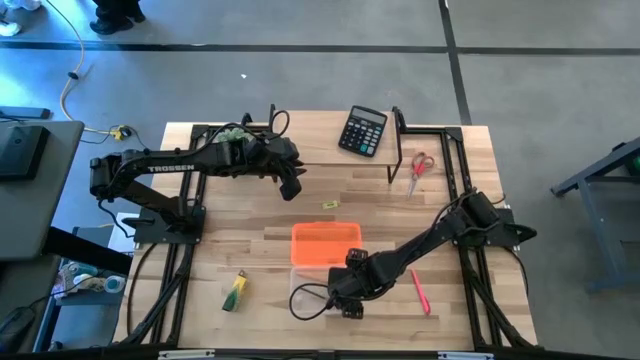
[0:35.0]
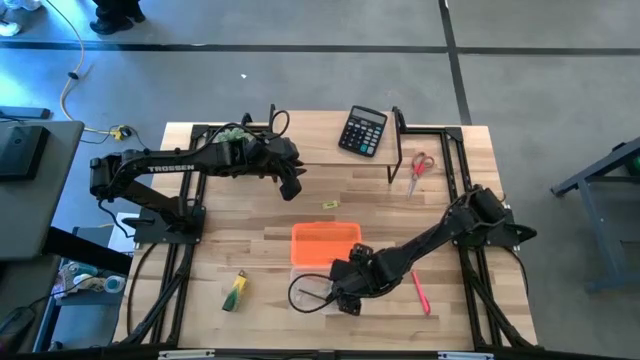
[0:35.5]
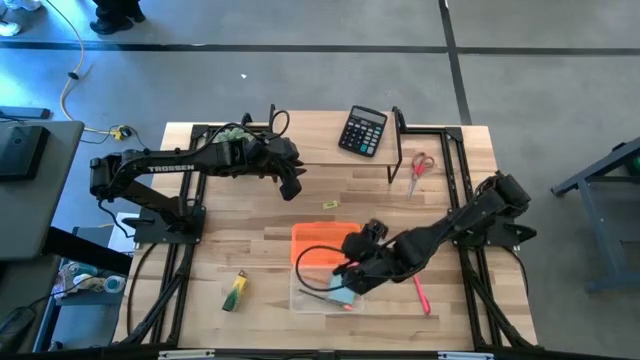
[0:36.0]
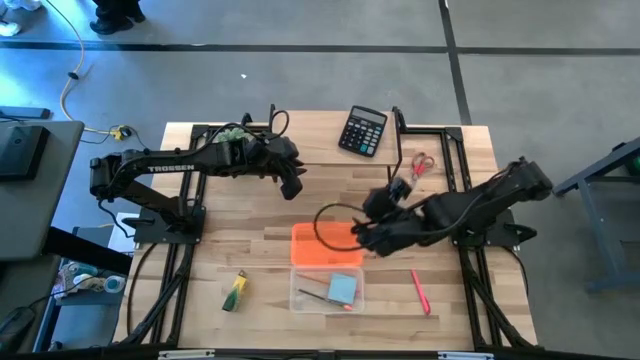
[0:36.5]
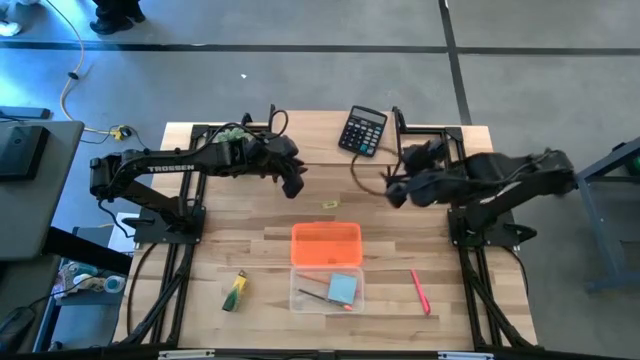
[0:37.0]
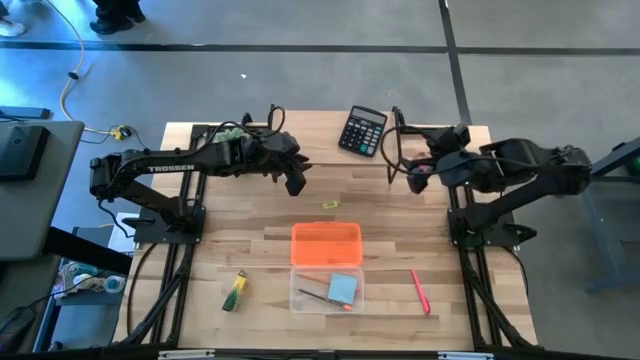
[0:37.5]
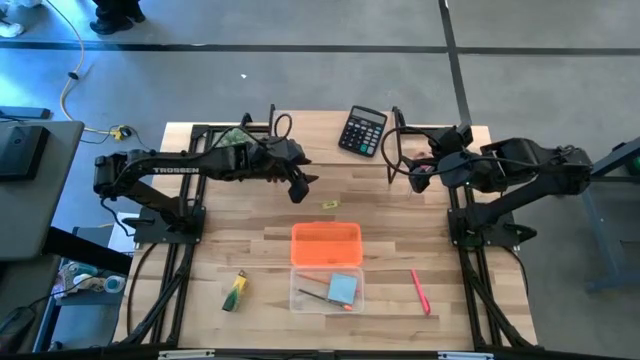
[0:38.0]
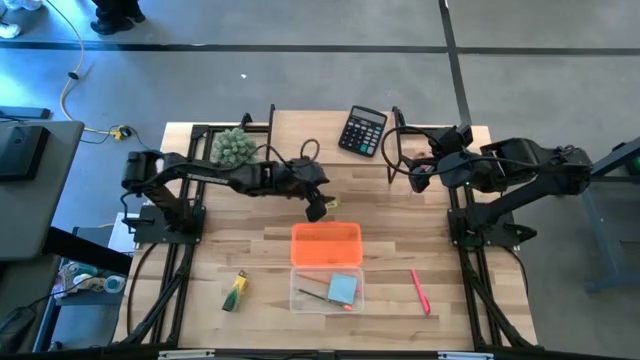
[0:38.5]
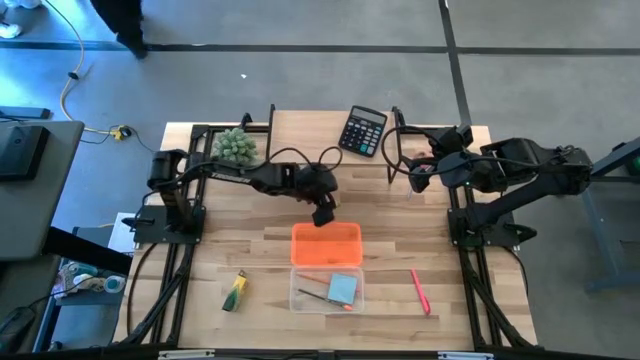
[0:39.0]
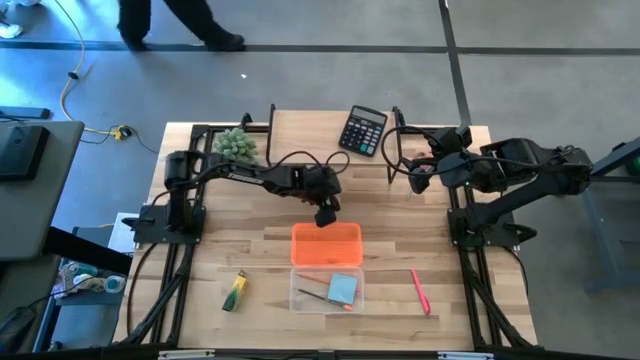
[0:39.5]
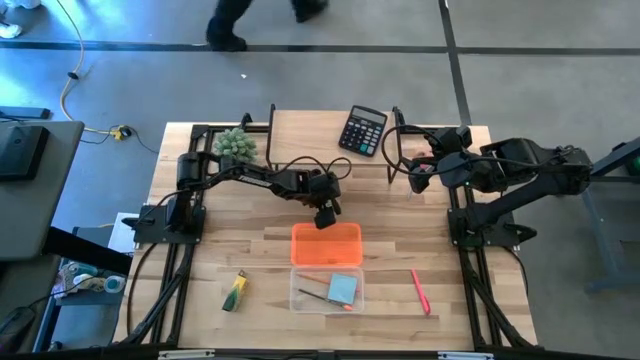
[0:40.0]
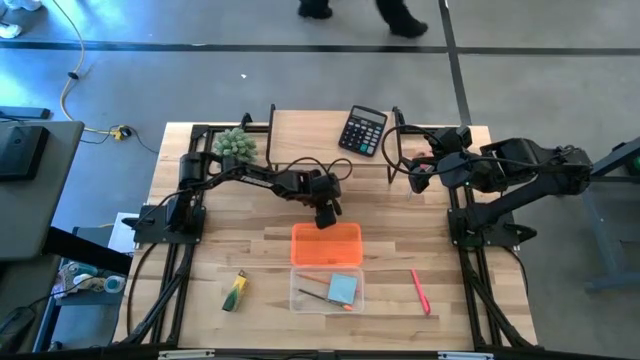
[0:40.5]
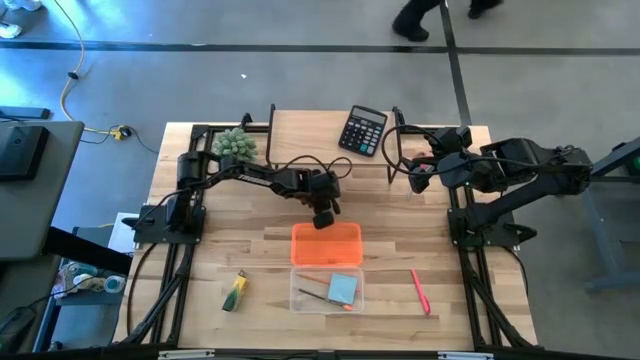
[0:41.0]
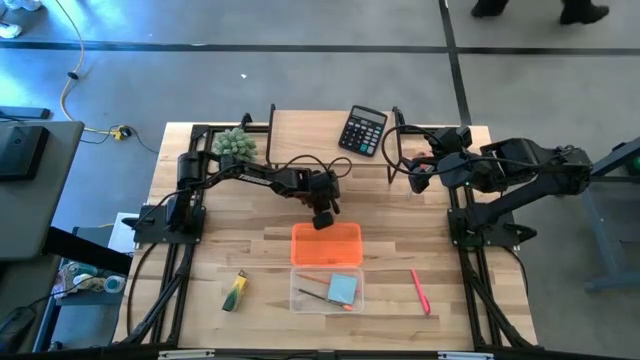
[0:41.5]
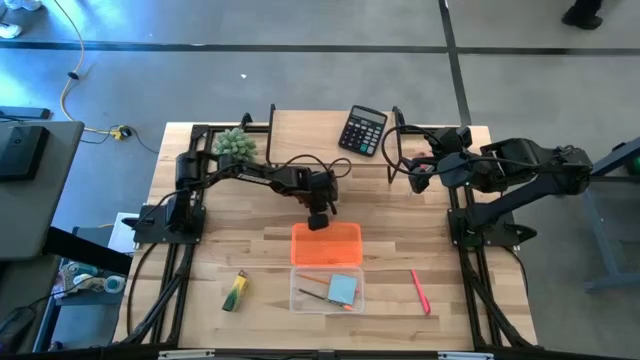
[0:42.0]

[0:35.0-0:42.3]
Task: Pack school essentials
Put the green eraser into the orange supply box

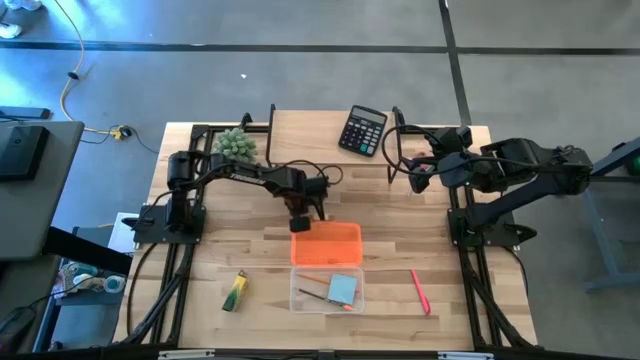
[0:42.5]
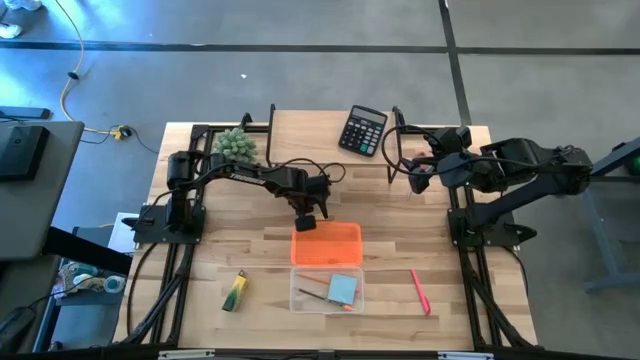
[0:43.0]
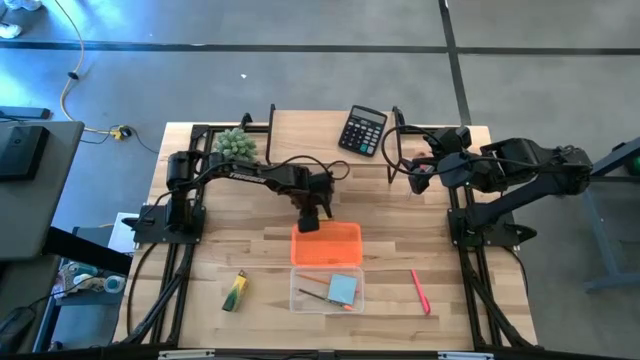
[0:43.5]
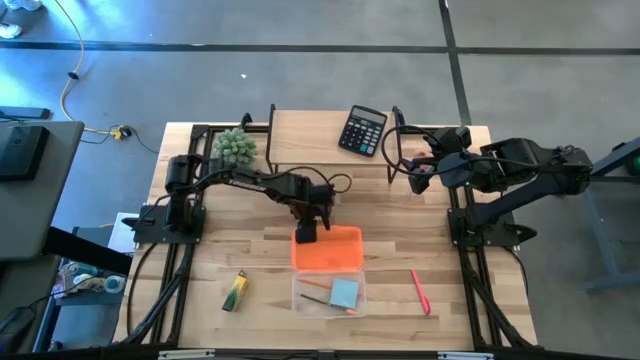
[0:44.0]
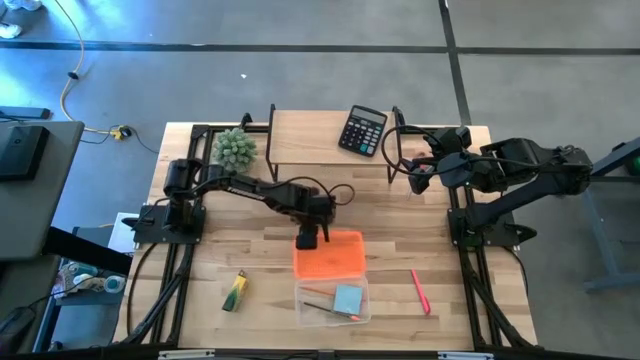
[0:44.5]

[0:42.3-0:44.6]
Adjust the orange supply box on the table

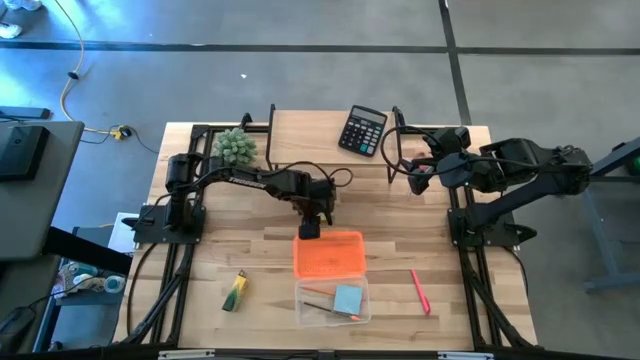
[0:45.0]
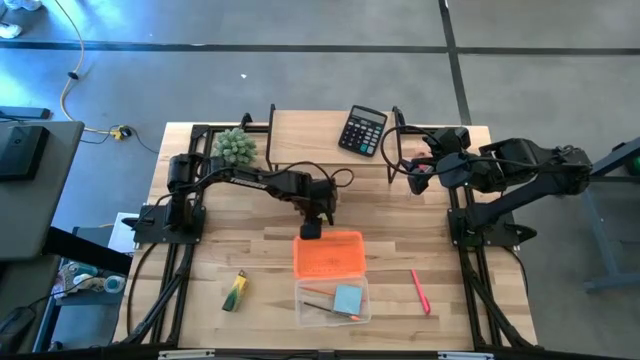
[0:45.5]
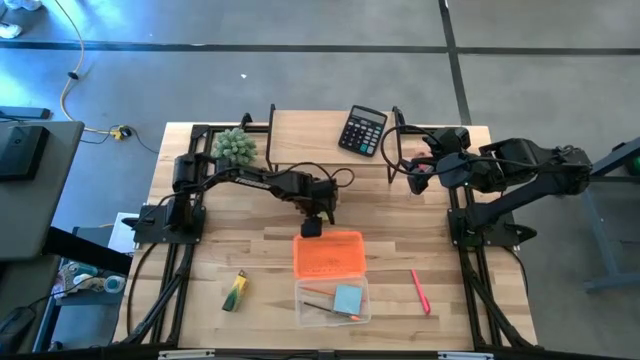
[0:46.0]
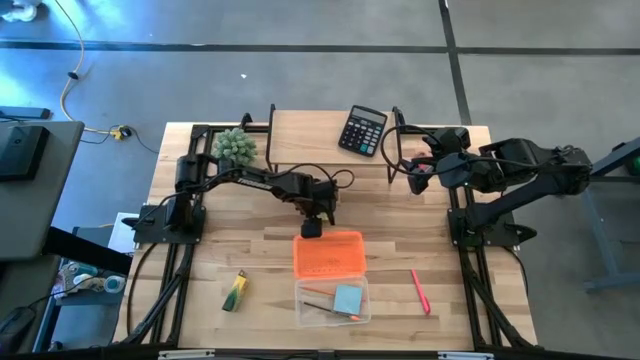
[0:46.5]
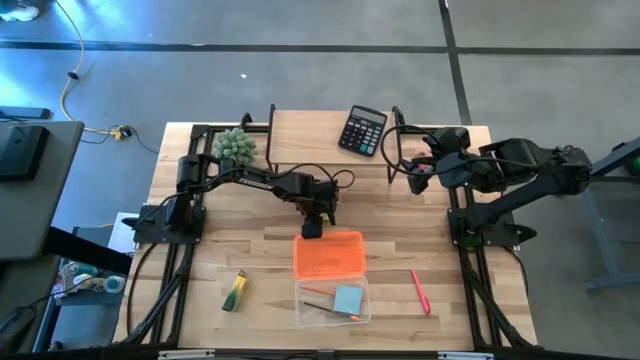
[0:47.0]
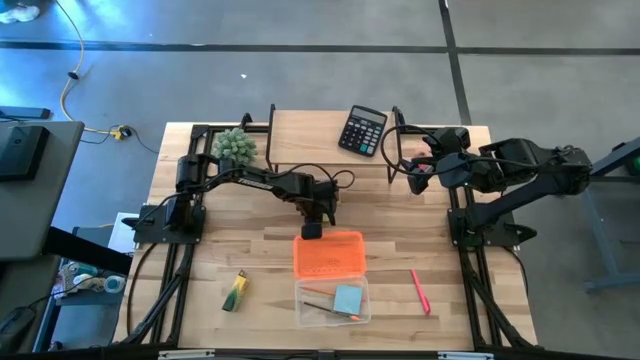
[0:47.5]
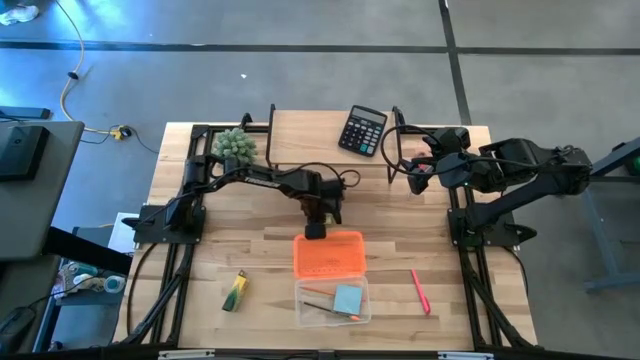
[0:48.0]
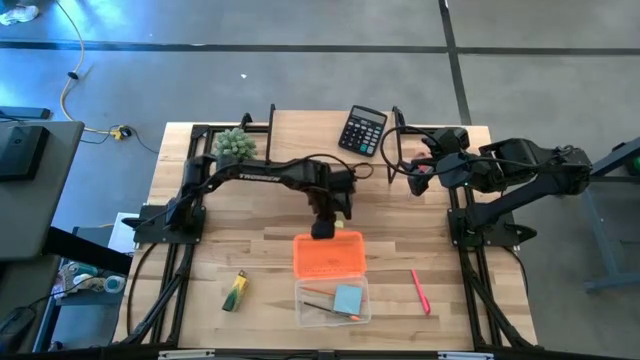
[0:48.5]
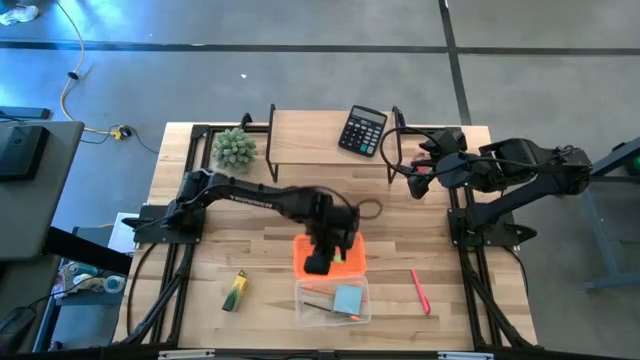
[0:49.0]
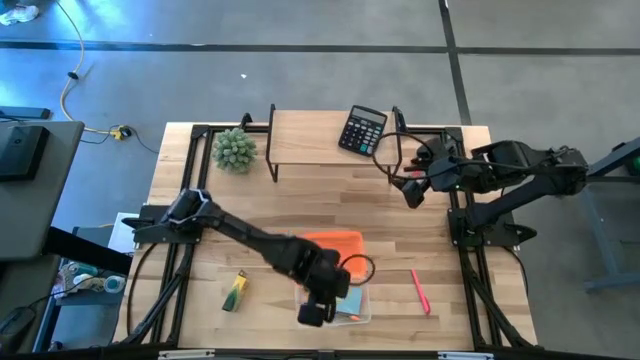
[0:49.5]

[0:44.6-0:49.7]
Put the green eraser into the orange supply box

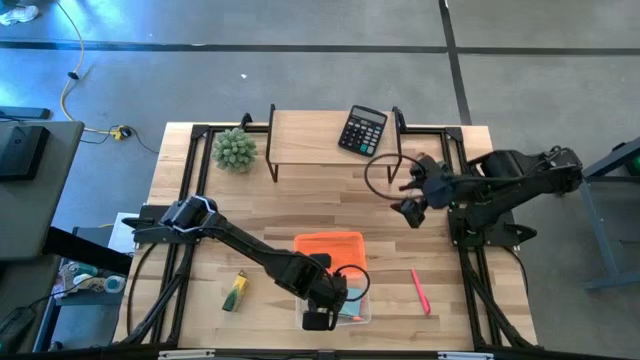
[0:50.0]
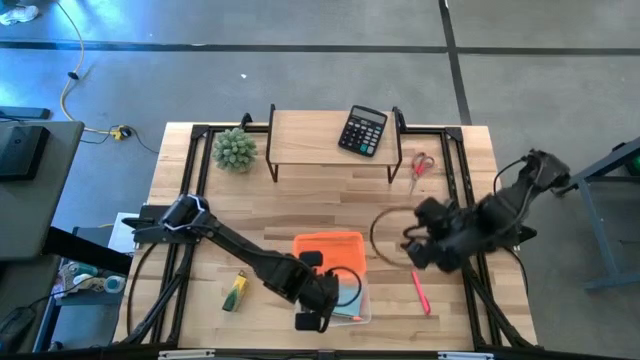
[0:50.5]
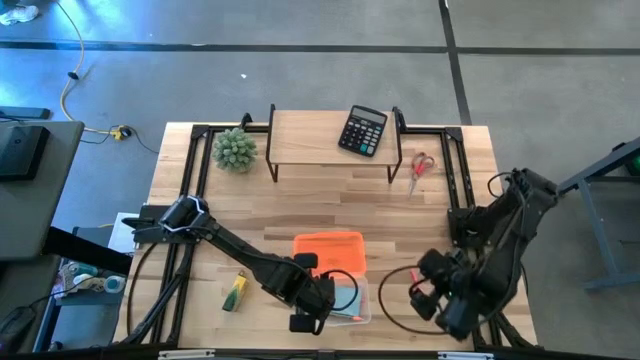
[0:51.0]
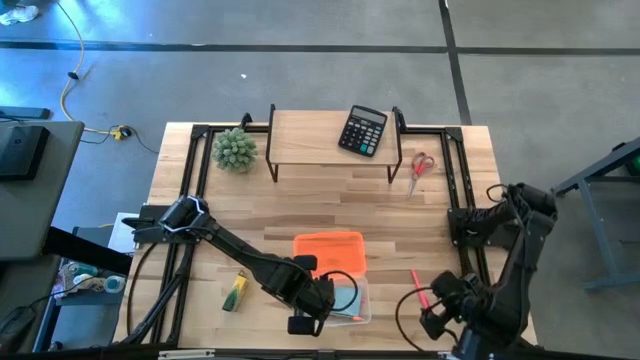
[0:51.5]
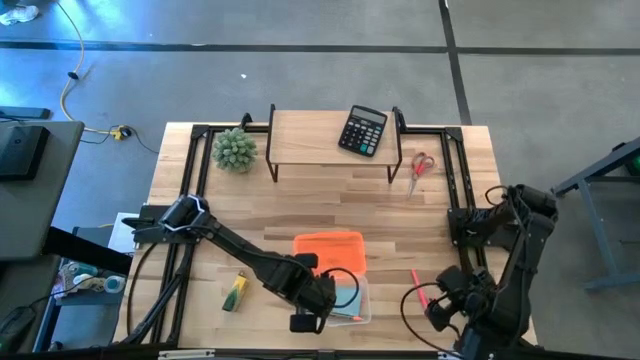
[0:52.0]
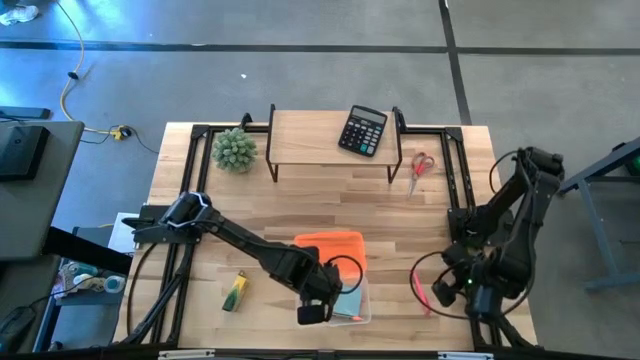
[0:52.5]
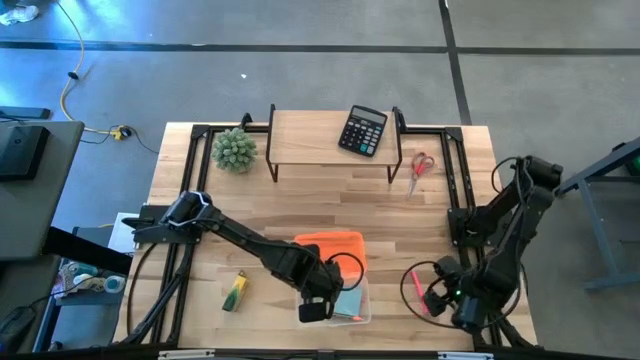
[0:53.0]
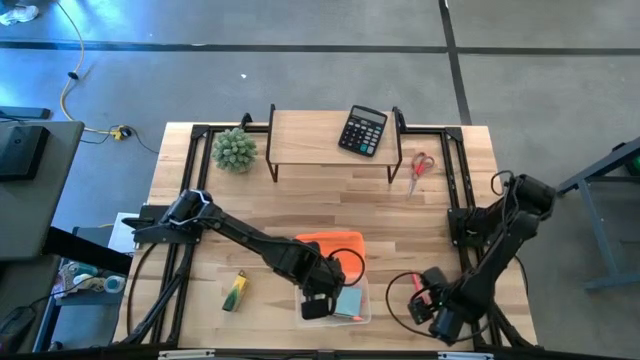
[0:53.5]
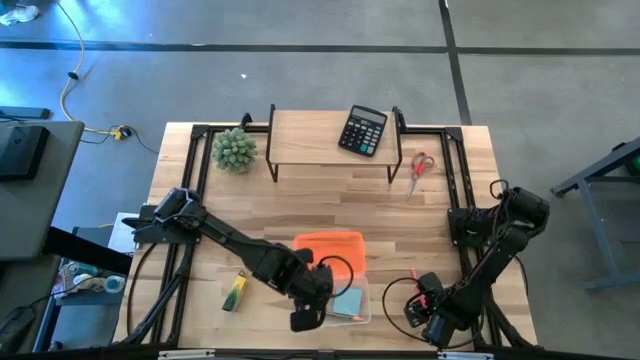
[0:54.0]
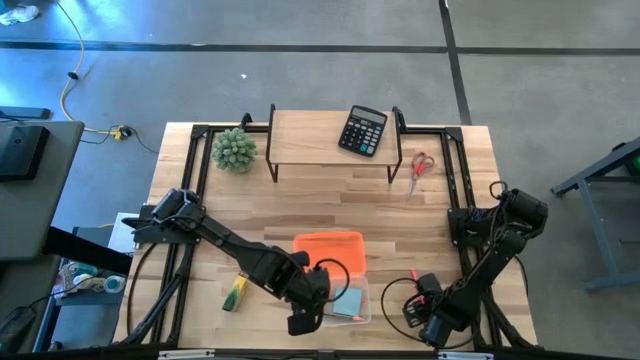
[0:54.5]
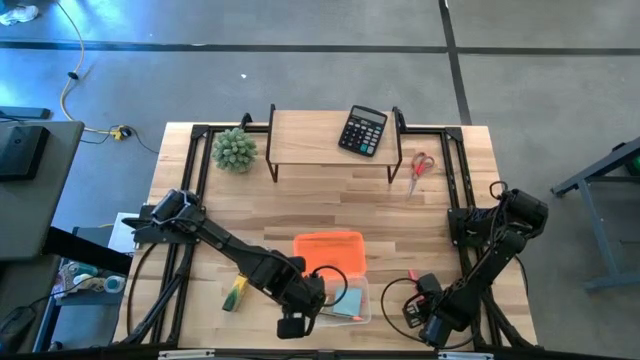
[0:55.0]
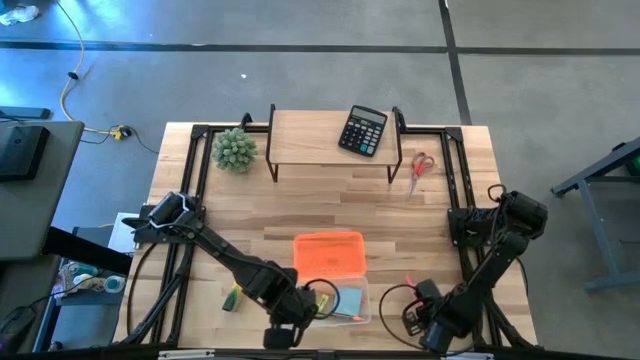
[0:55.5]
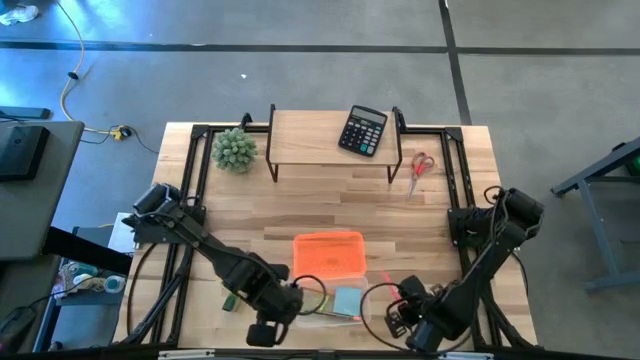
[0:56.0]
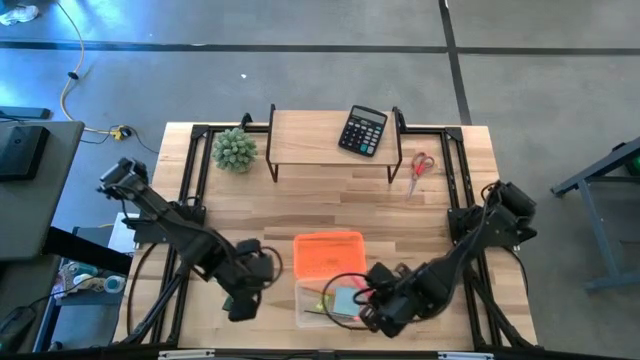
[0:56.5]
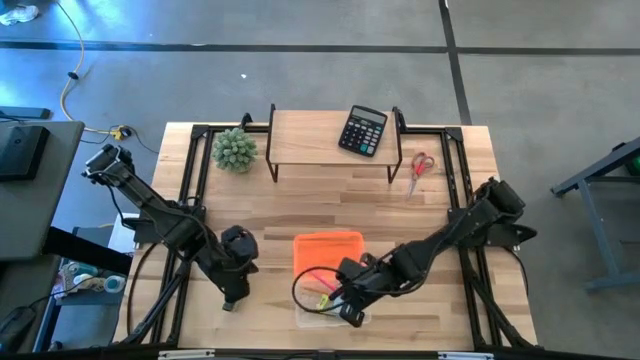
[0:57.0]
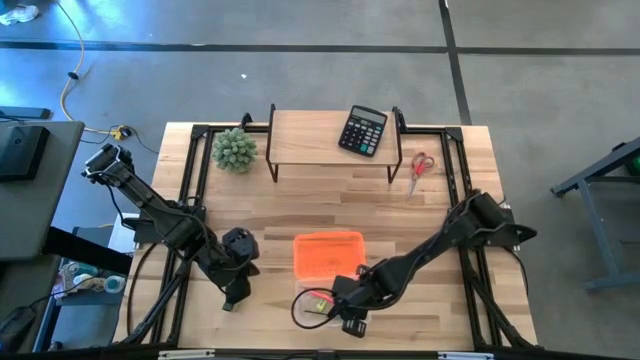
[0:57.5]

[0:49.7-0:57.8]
Put the pink pen into the orange supply box
